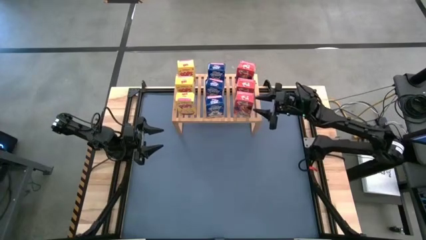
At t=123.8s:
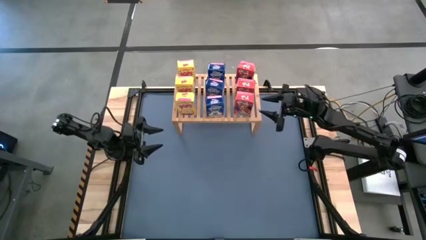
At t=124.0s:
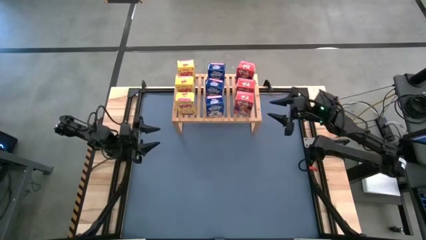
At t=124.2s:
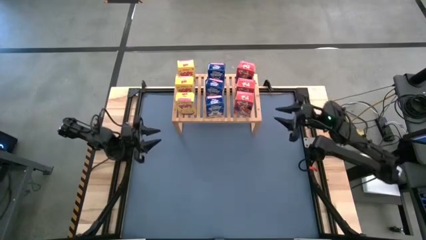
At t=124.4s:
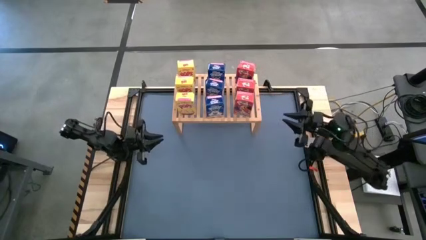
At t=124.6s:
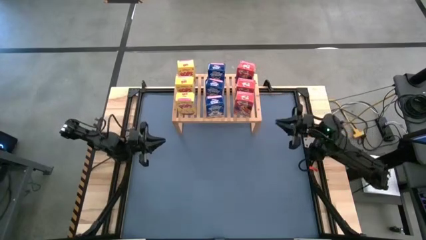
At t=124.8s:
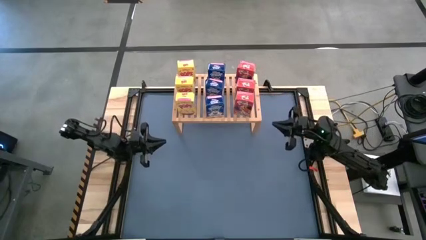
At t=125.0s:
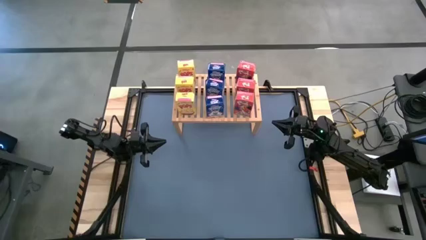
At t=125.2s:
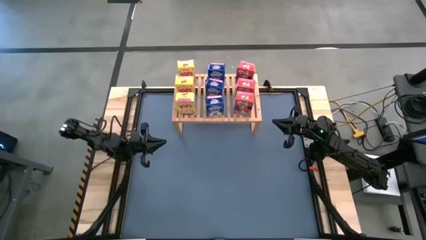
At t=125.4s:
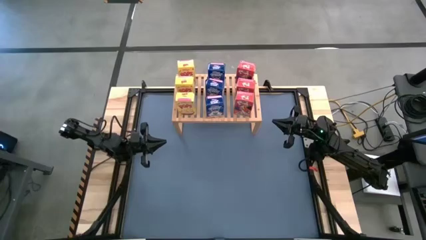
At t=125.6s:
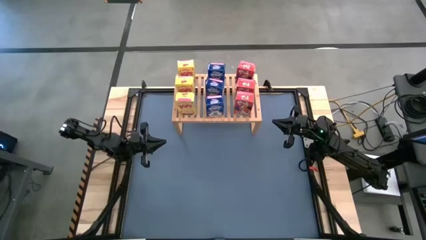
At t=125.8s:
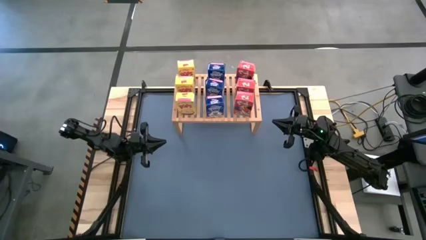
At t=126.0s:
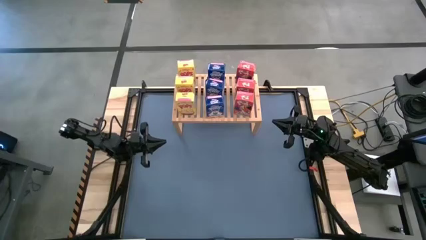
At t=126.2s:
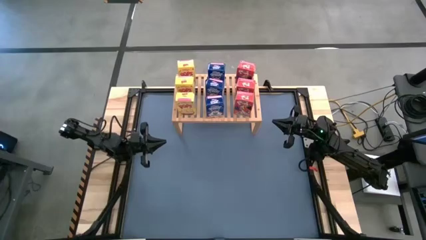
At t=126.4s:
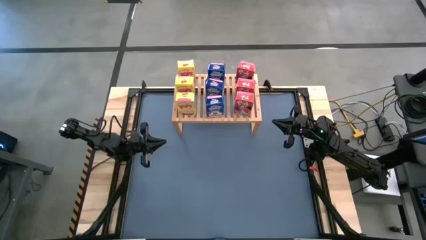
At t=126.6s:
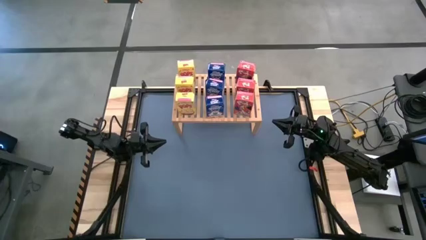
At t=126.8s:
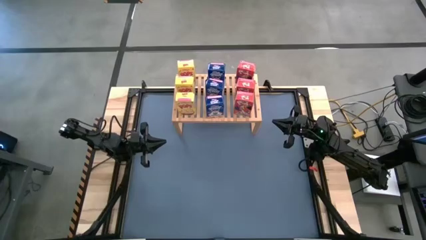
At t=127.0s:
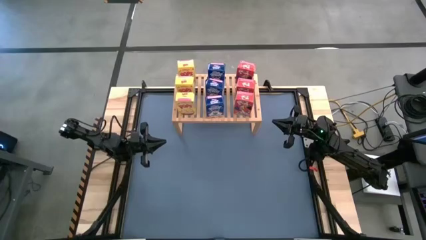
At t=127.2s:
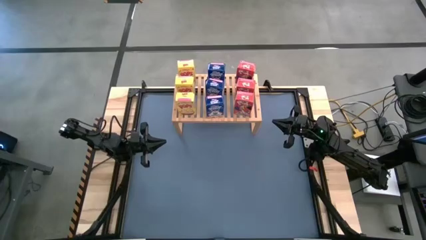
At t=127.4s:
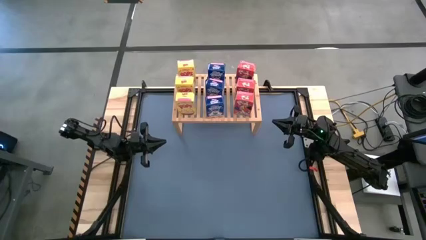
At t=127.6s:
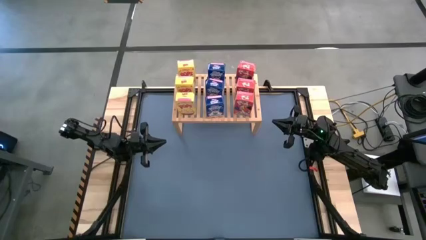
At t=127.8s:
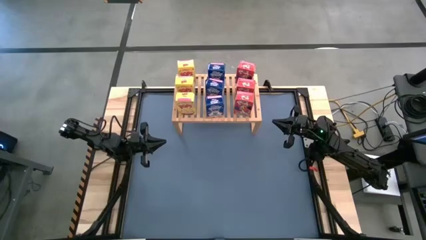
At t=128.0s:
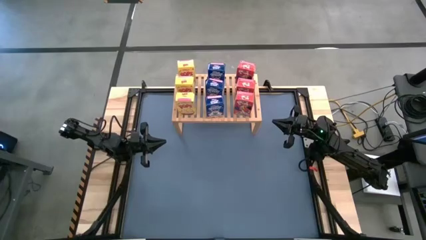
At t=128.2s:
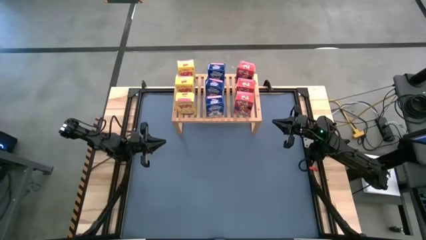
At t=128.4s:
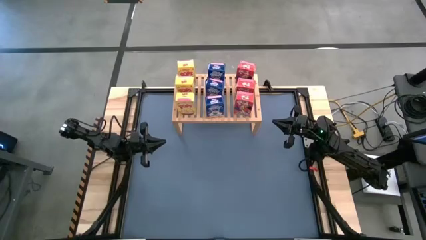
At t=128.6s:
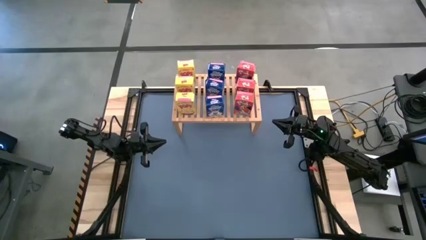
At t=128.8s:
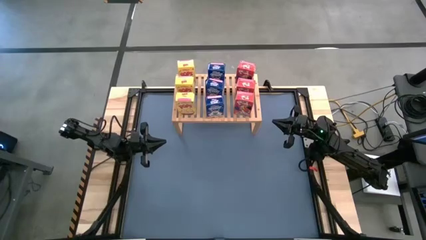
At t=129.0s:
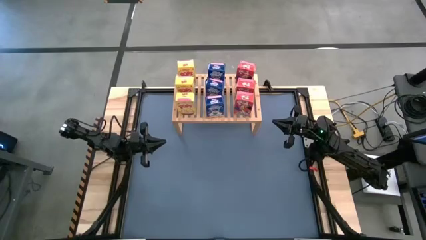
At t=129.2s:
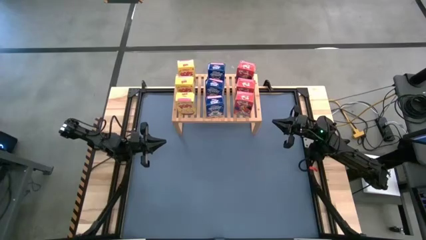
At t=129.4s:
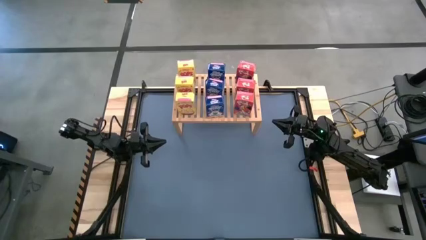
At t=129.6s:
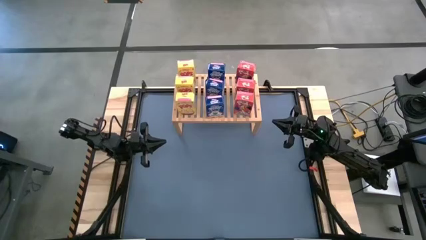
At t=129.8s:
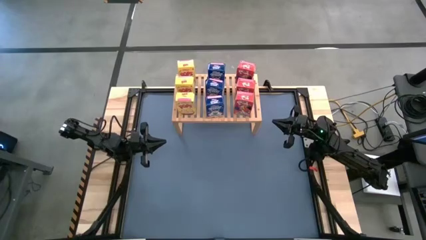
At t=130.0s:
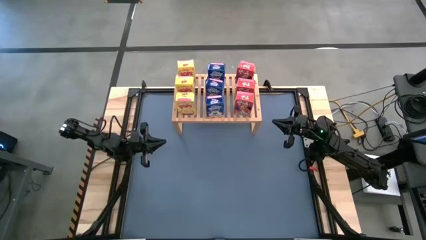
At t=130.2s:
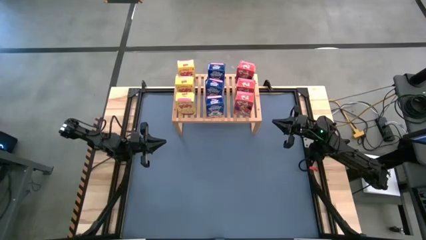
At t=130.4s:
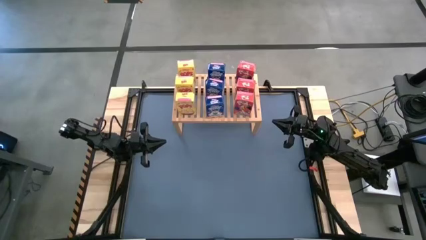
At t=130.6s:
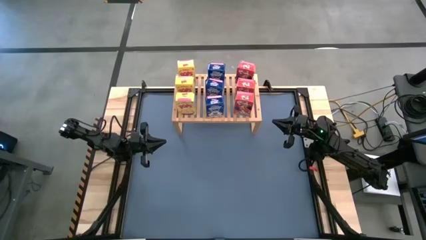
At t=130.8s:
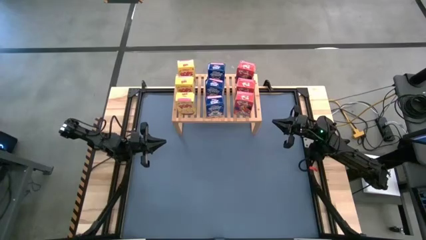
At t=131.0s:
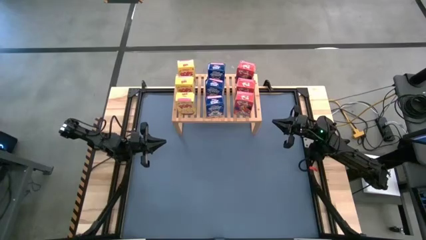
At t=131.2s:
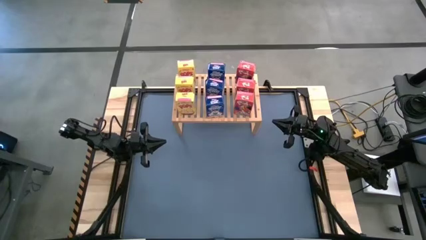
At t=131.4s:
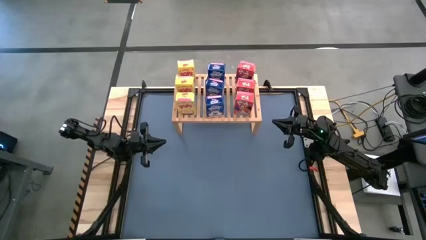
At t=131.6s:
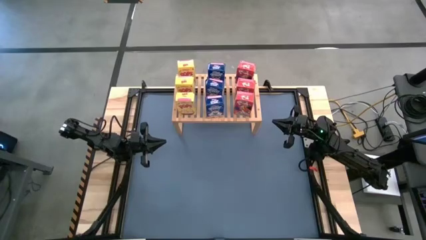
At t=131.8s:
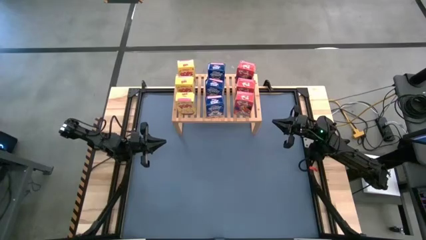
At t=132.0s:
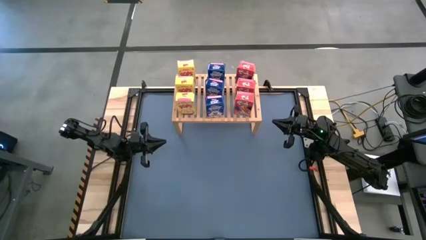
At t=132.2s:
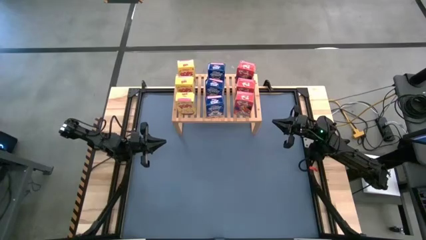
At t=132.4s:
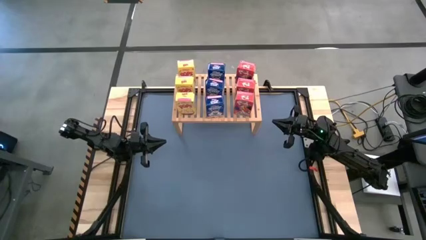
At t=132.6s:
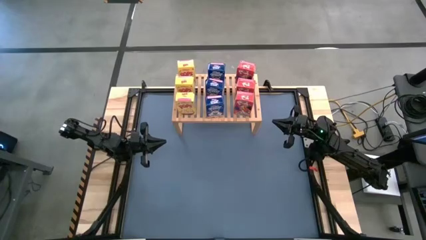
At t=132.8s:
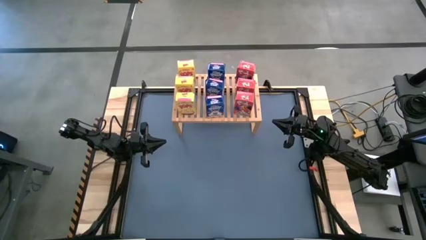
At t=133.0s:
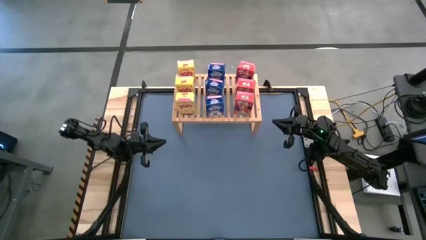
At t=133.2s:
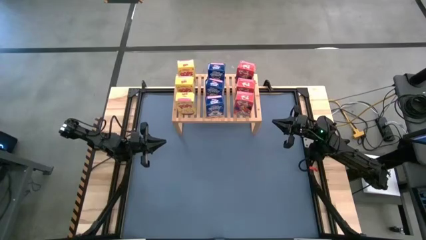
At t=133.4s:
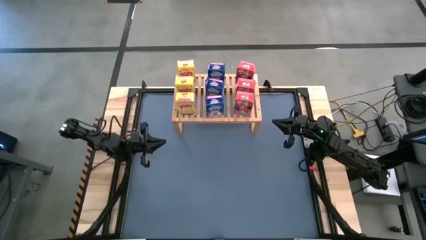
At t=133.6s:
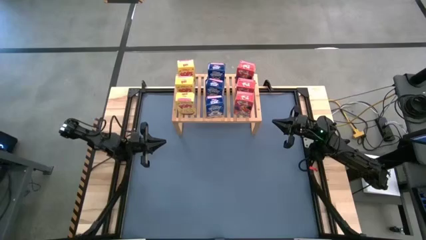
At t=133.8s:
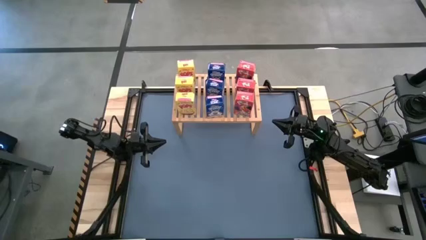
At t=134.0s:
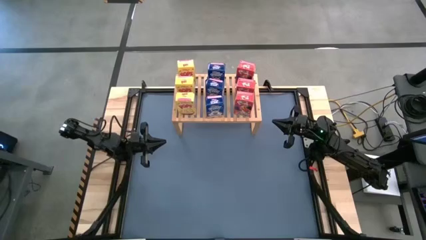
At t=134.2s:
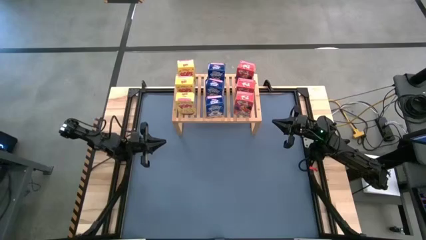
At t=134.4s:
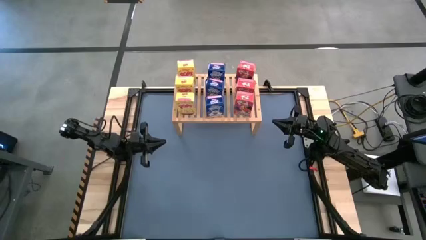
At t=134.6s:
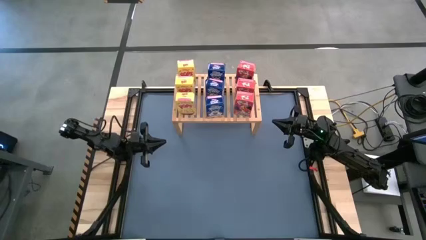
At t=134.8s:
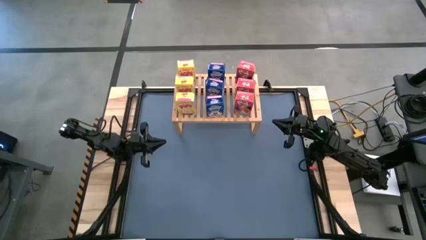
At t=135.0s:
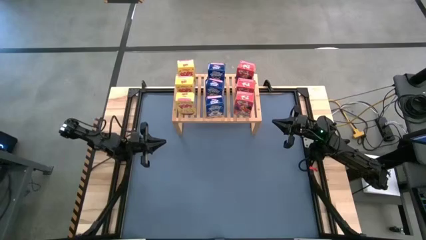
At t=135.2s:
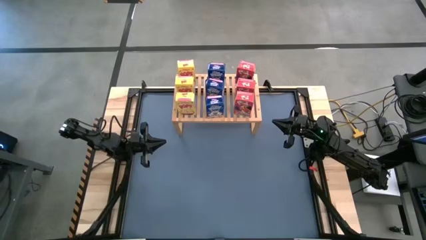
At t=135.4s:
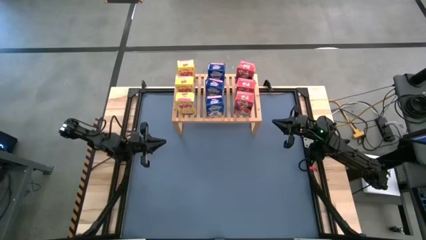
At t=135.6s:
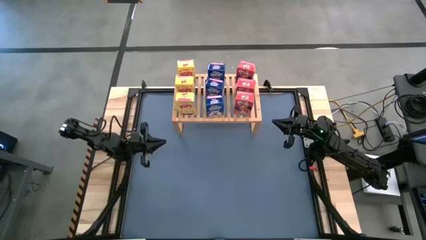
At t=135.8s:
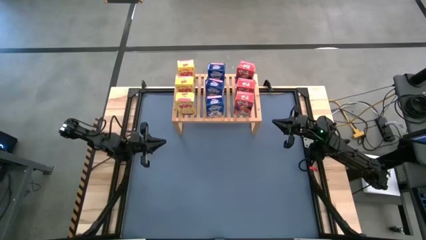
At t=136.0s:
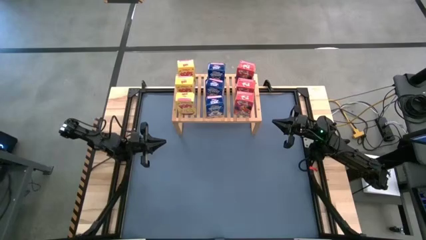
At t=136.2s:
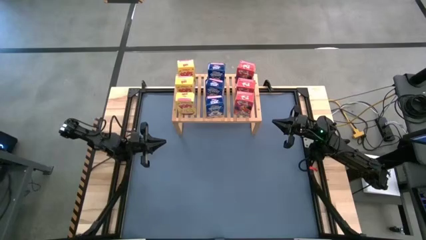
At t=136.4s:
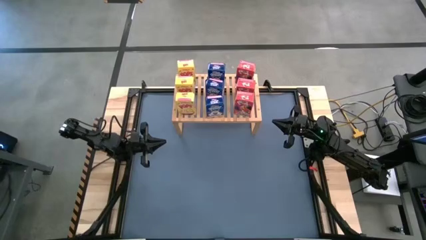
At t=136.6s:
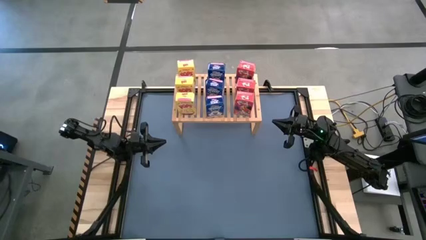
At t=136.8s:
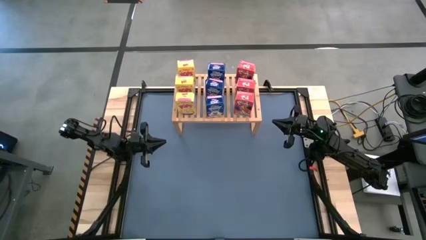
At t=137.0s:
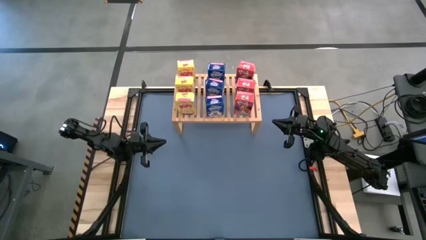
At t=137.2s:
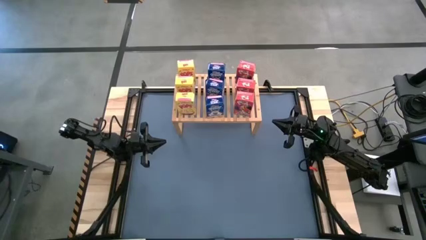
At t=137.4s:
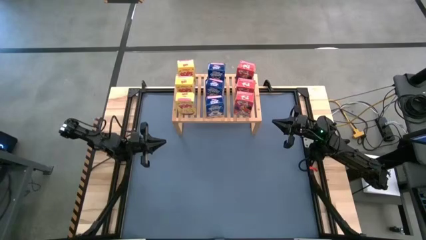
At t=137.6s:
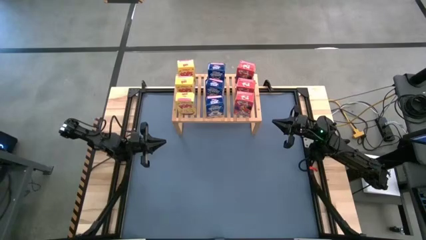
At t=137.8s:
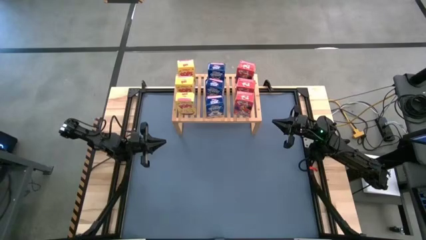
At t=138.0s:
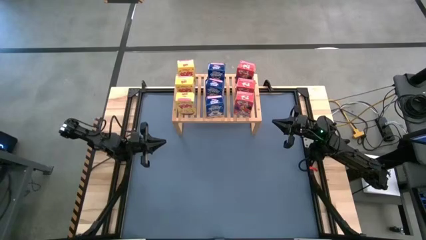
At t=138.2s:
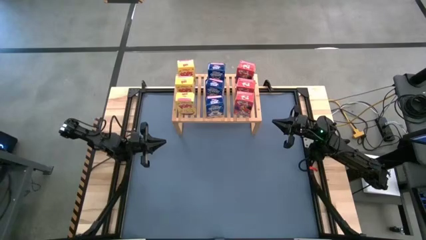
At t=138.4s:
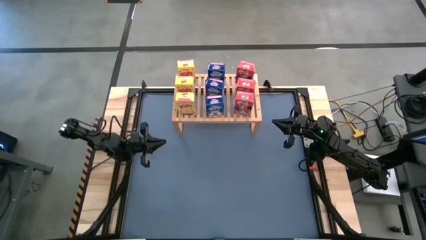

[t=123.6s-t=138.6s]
Task: Stack cereal on shelf
Return to Home Position

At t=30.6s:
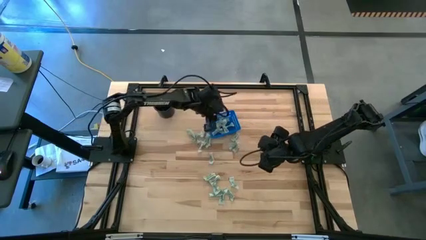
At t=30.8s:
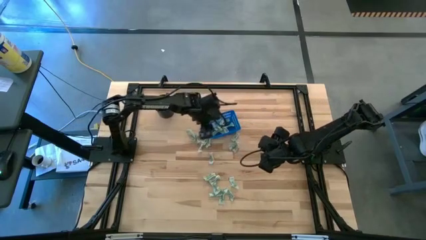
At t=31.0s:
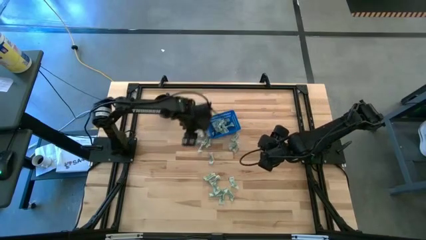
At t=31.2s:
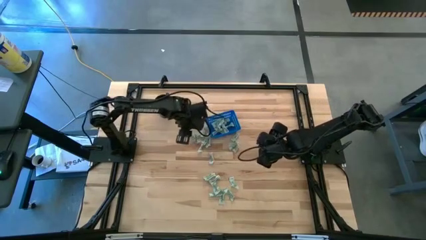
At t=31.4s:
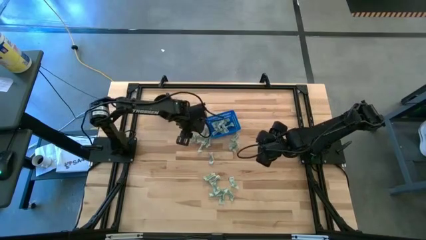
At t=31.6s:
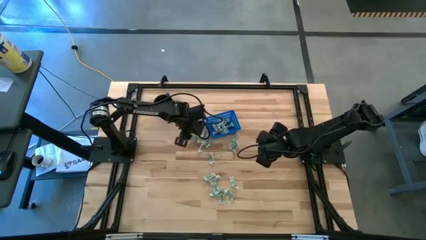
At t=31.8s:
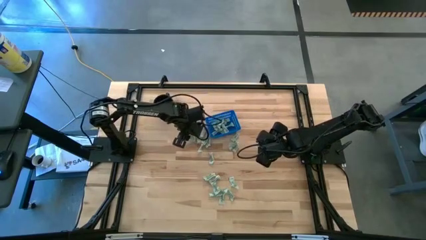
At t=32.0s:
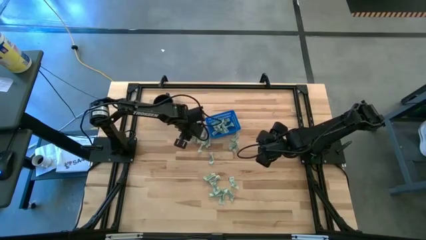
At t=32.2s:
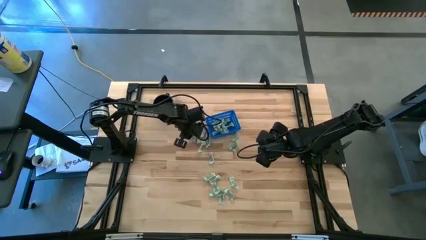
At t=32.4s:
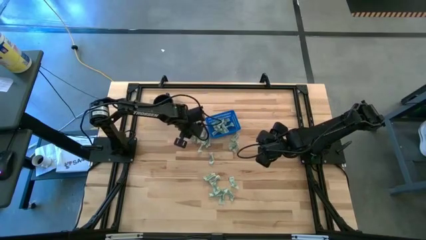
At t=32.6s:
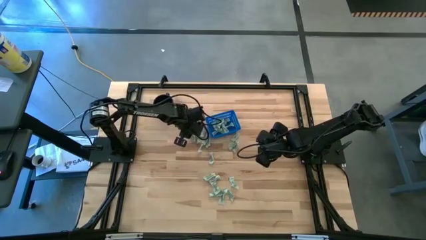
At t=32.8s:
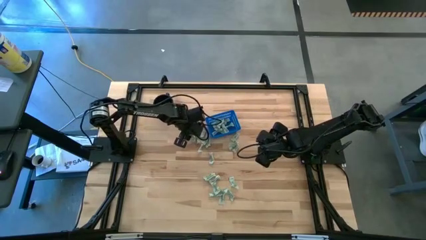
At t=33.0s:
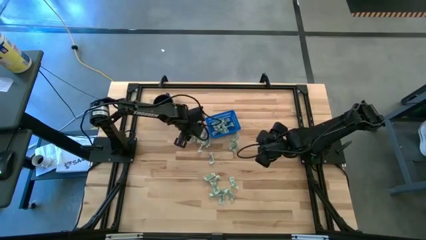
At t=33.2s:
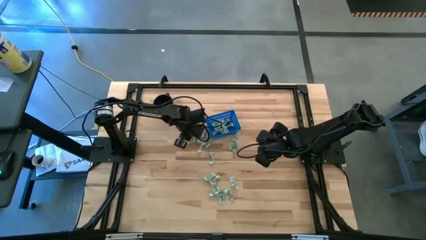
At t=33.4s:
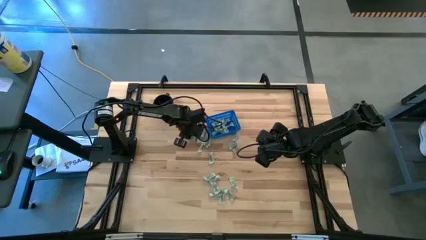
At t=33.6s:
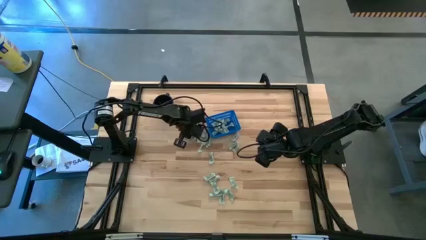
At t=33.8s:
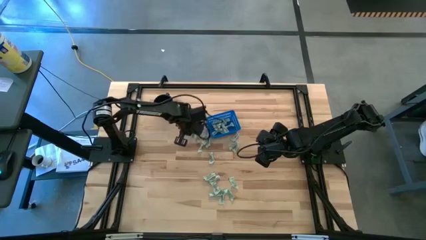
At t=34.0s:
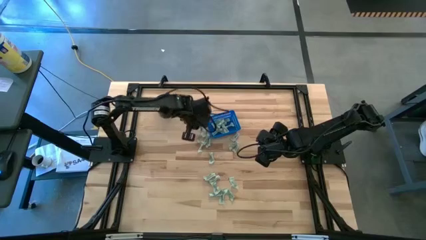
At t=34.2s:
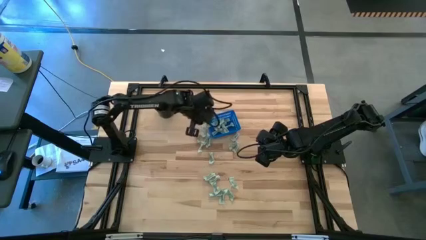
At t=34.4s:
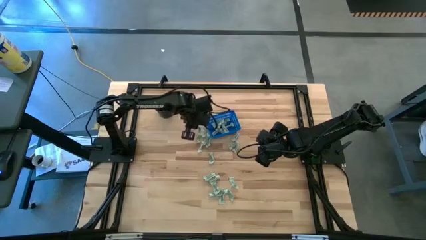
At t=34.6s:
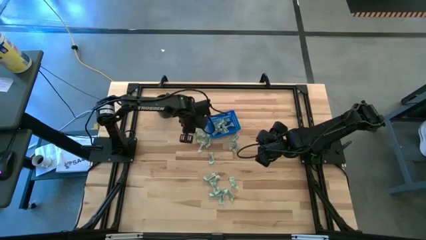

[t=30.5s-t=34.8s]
Task: Pick and place Stevia / Truvia into bins
Put the green stevia packet into the blue bin
